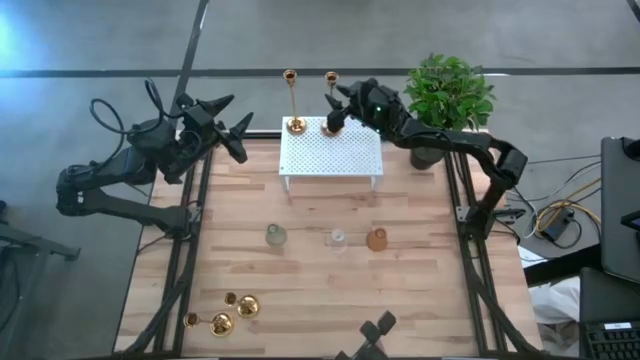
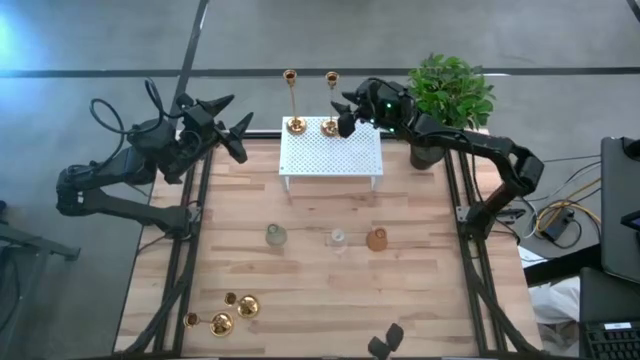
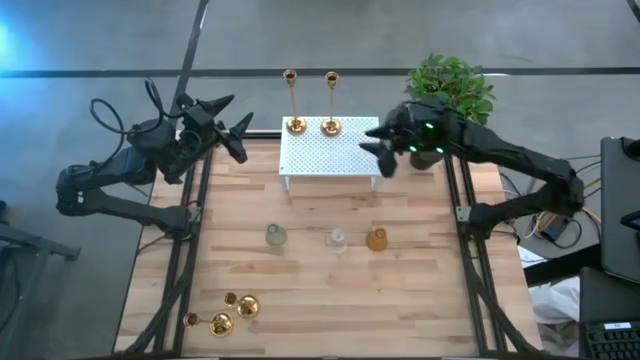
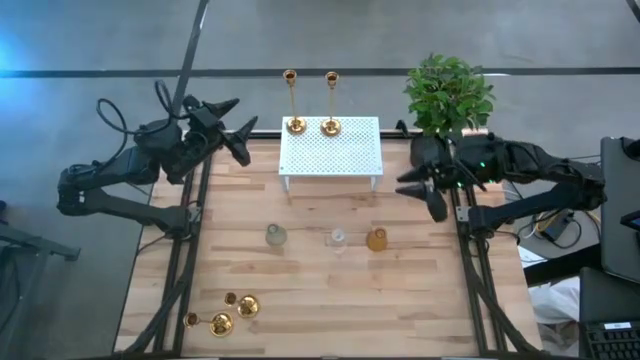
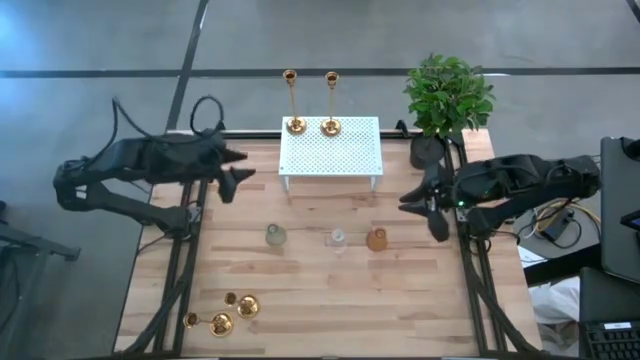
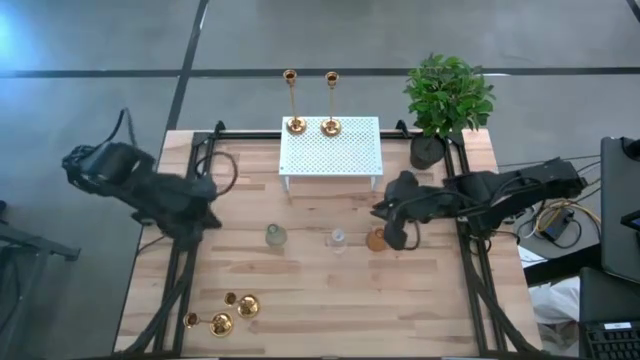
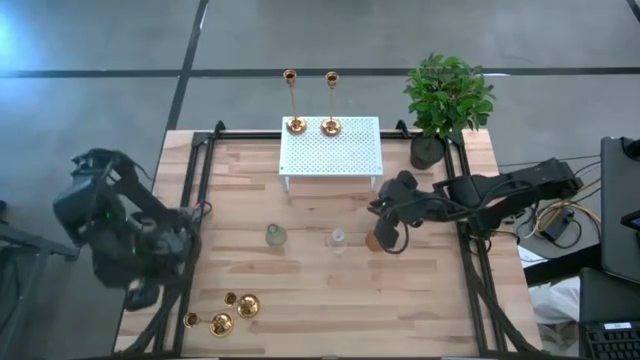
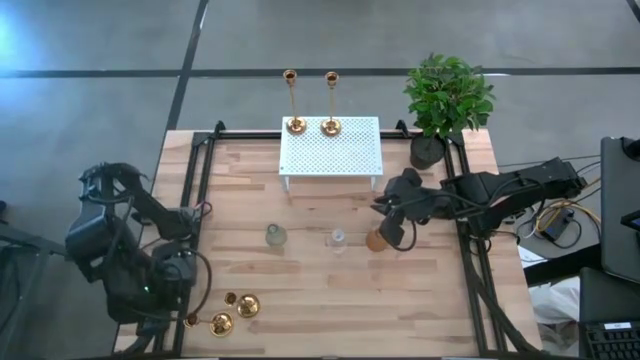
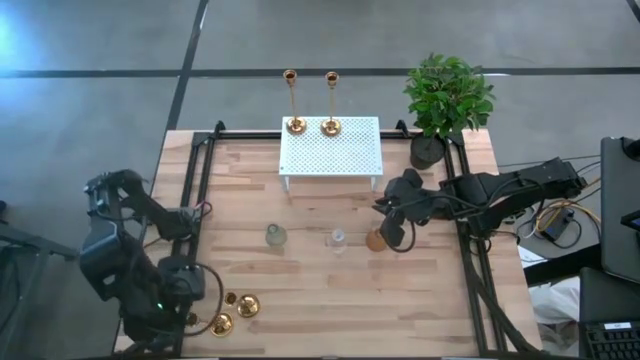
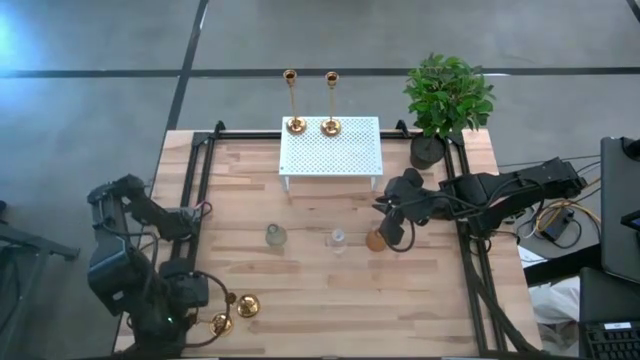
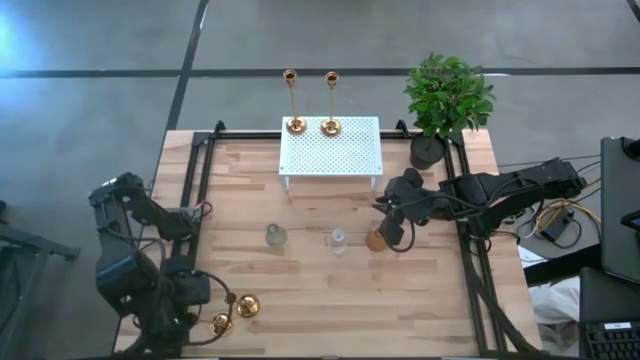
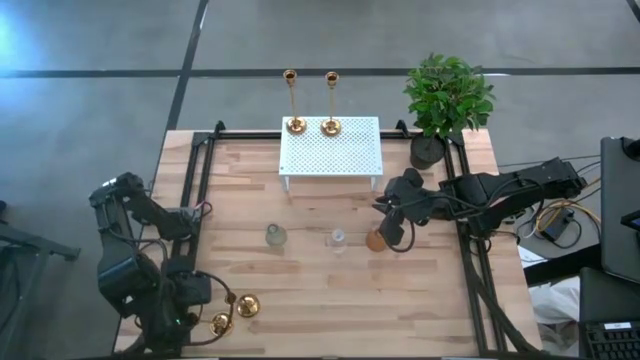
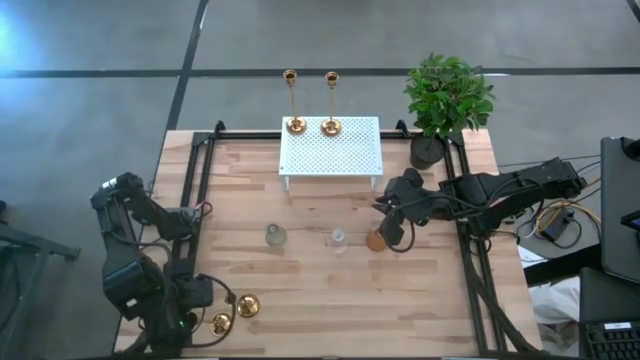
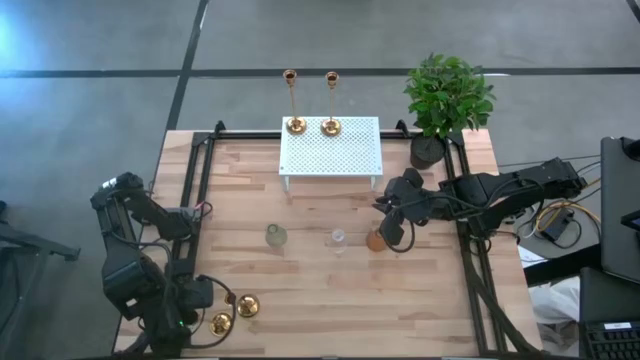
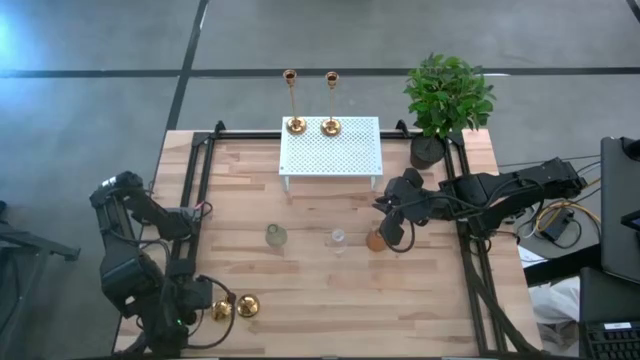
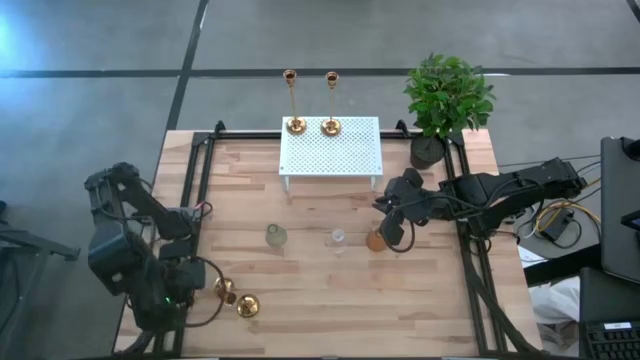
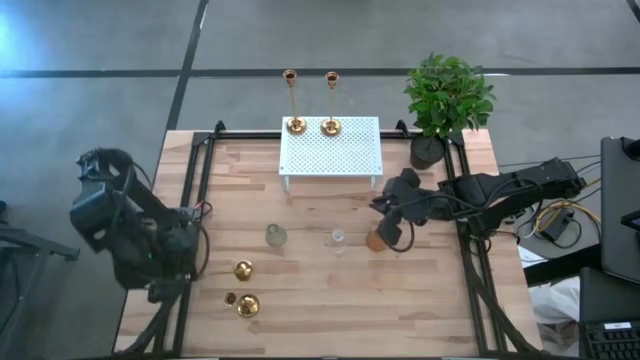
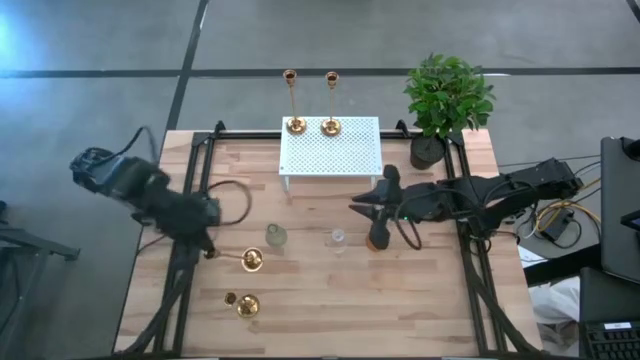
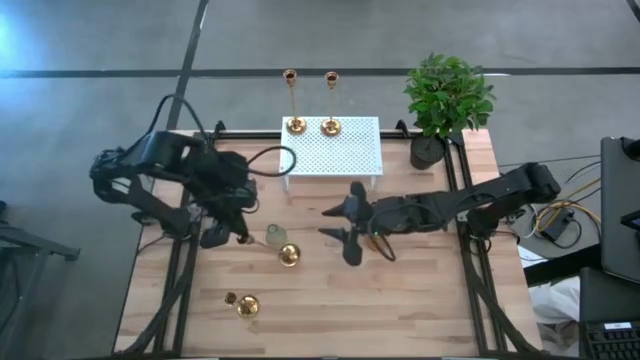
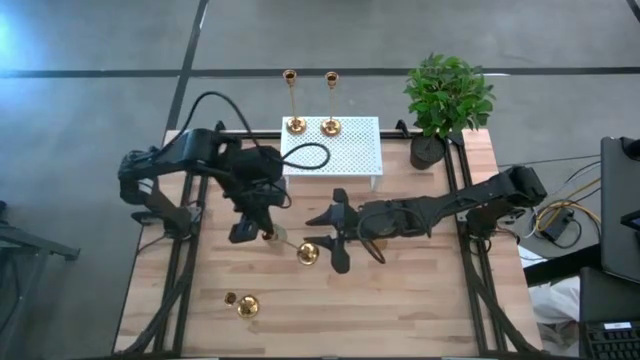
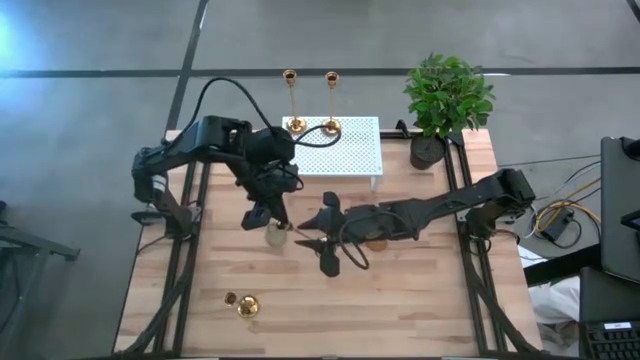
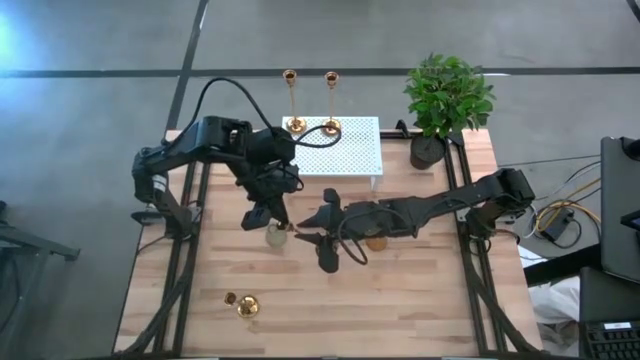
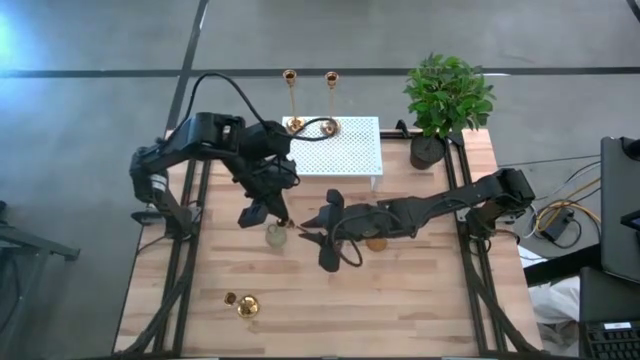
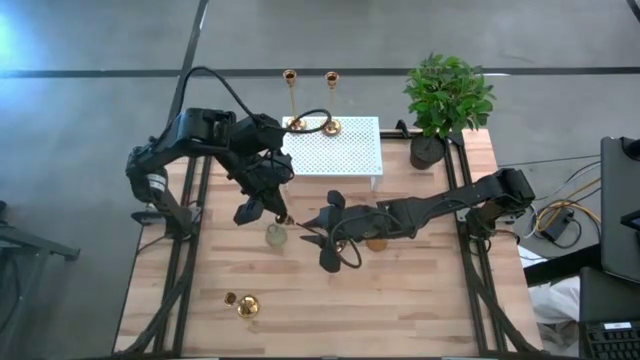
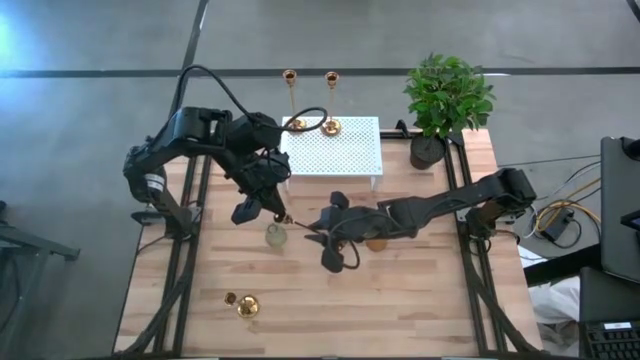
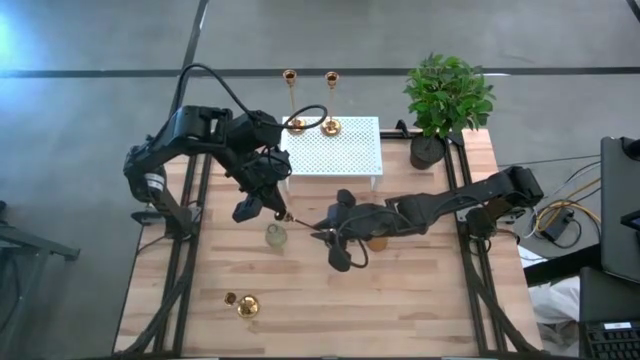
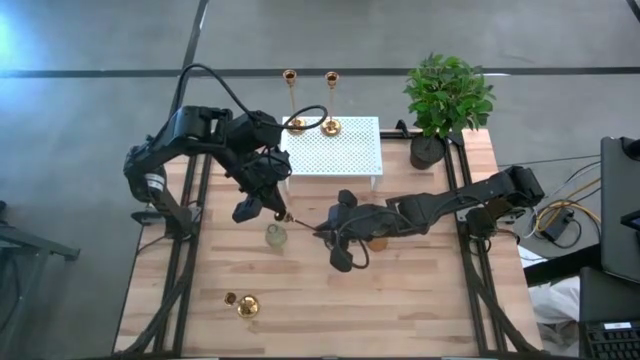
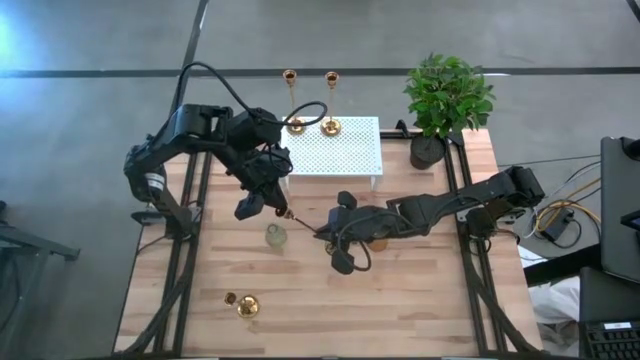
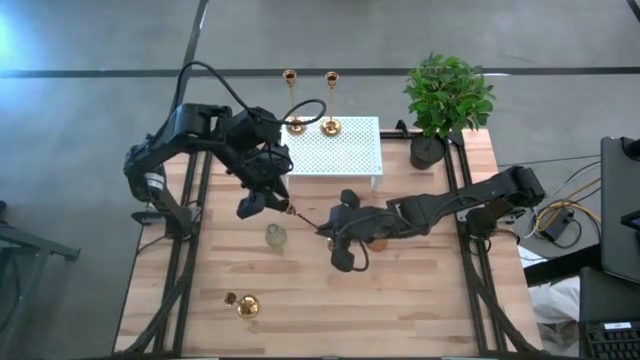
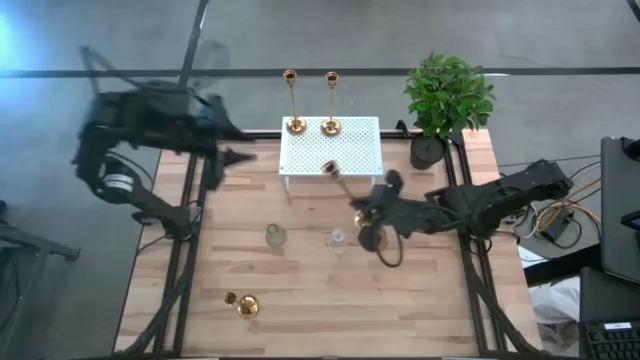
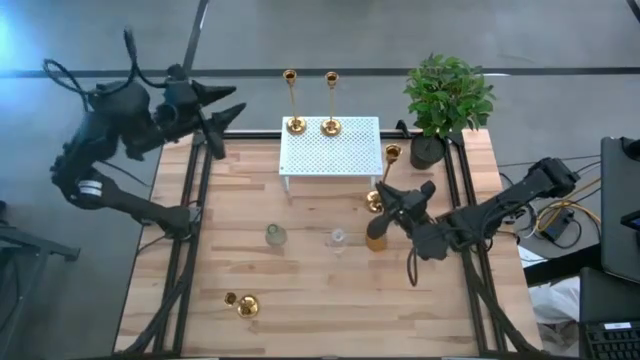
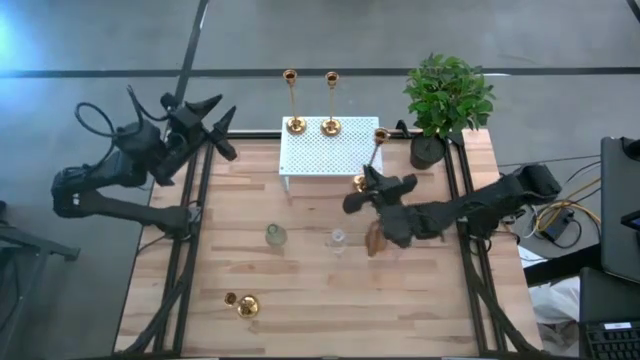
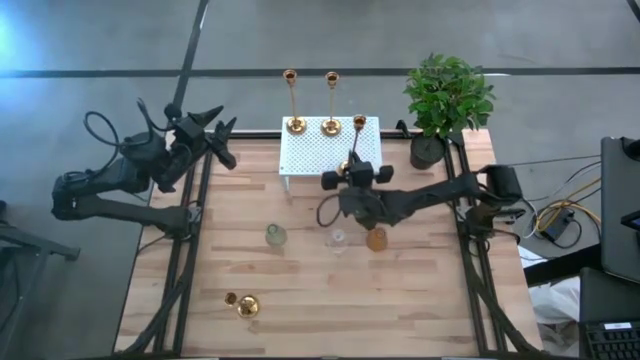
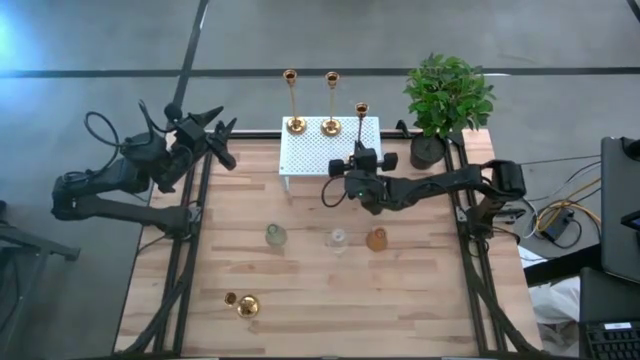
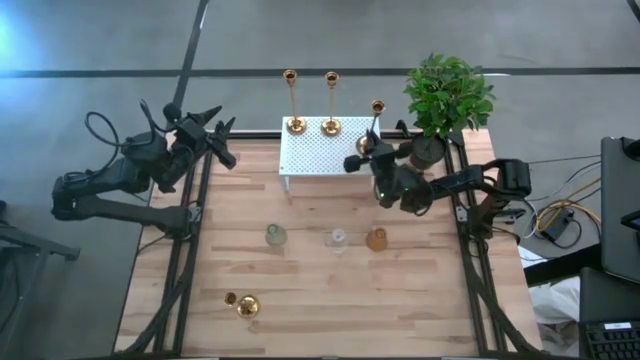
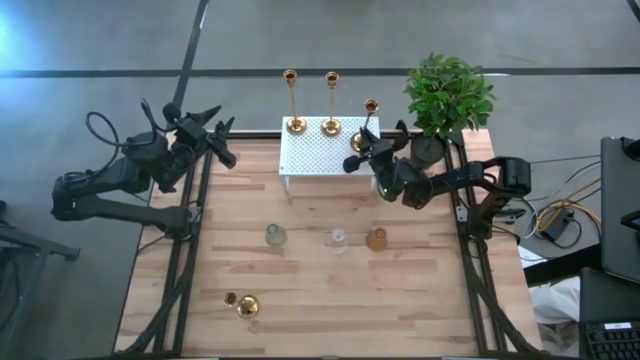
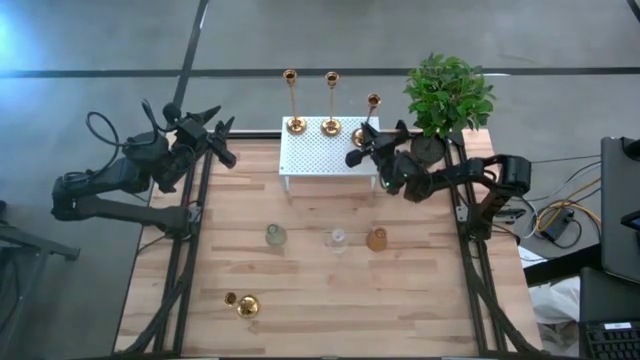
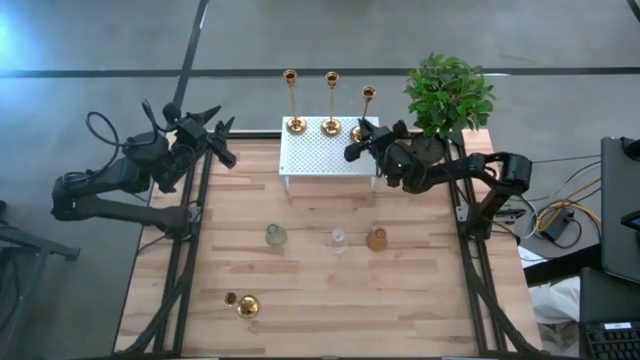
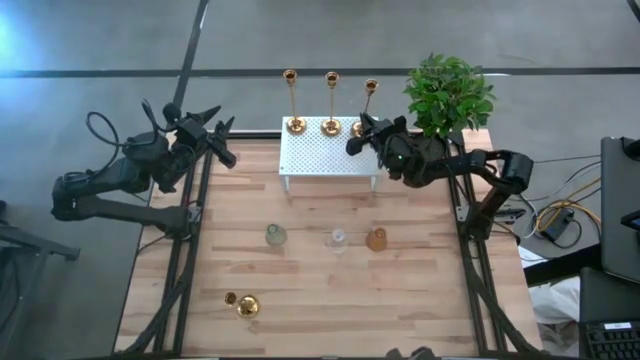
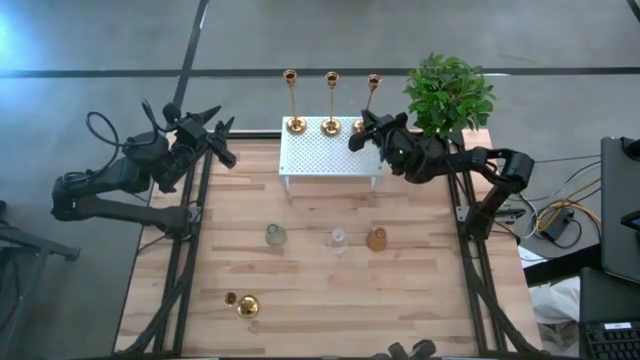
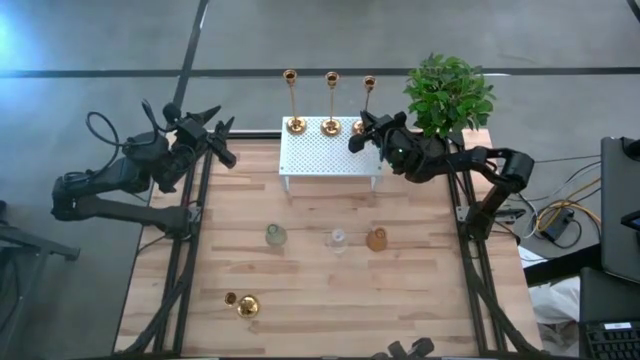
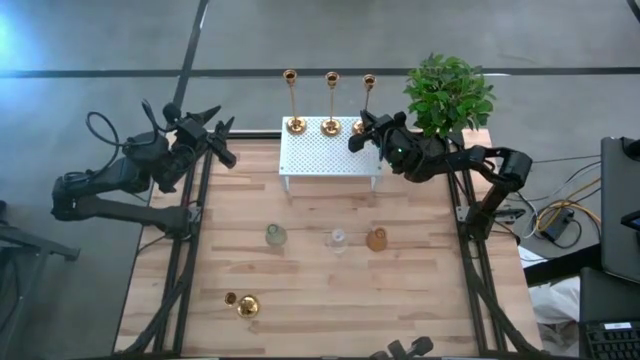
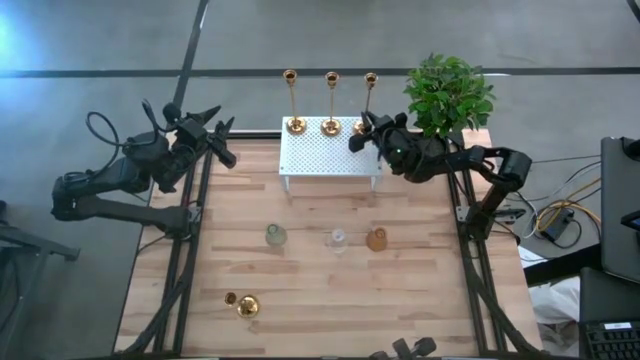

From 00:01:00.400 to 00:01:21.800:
Task: Pick & Place candle stick holders
Align the gold candle holder with the other gold candle holders on the shelf
